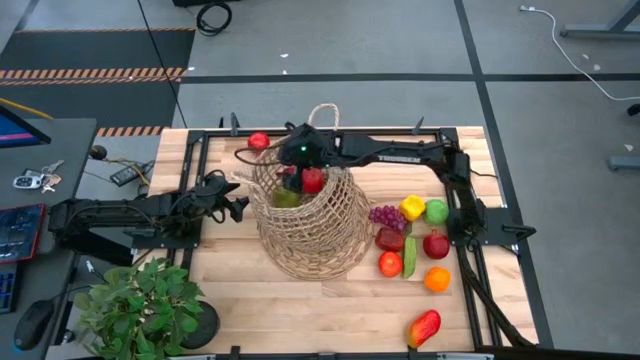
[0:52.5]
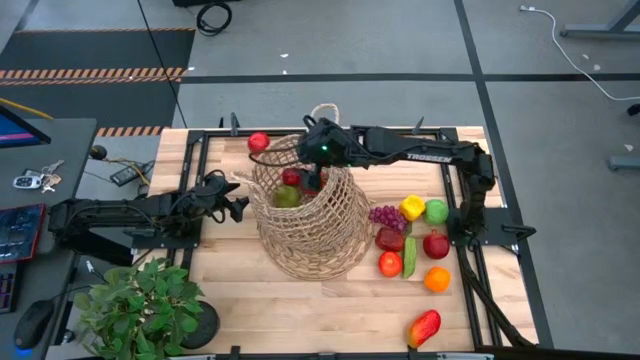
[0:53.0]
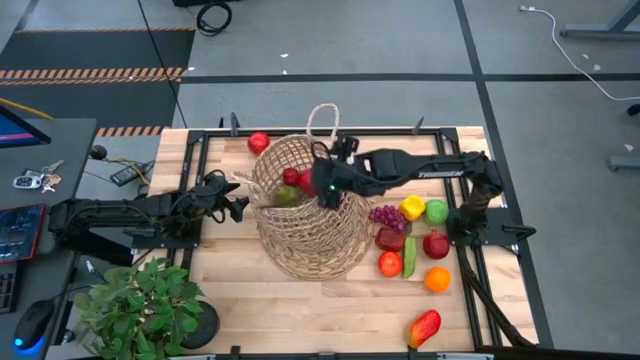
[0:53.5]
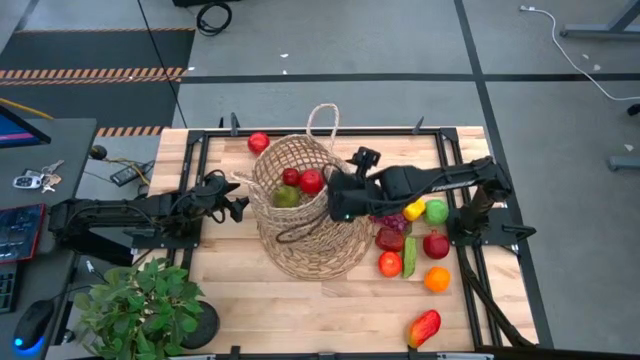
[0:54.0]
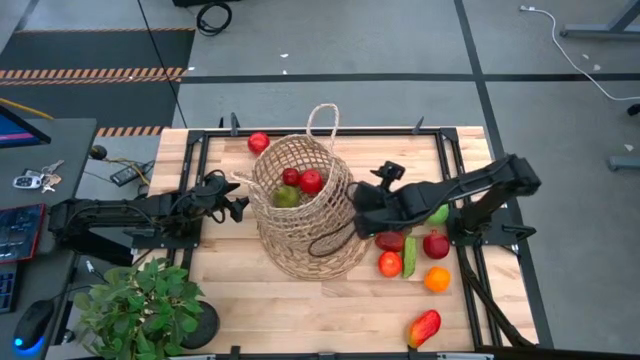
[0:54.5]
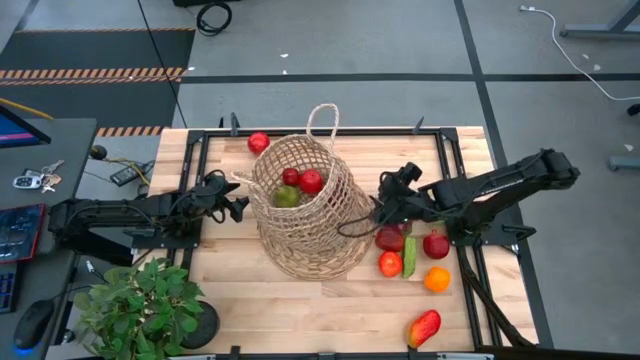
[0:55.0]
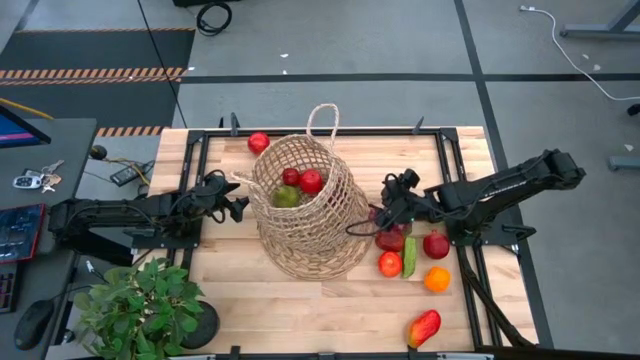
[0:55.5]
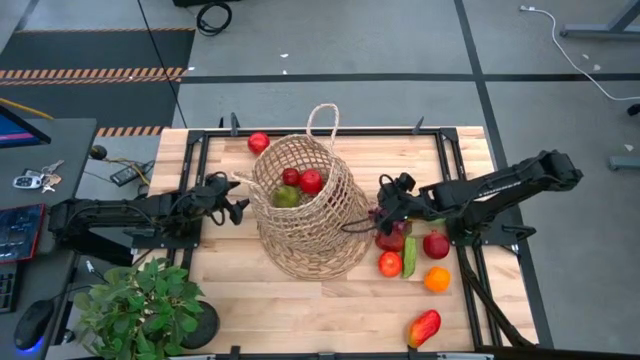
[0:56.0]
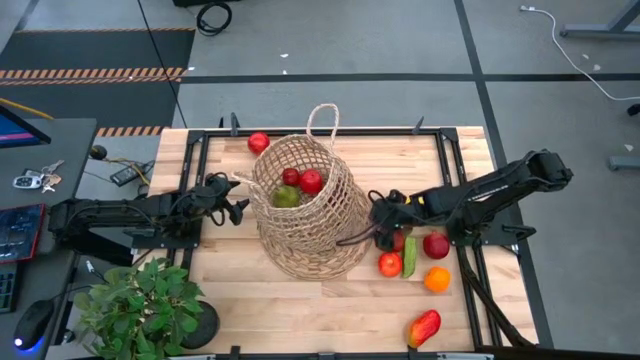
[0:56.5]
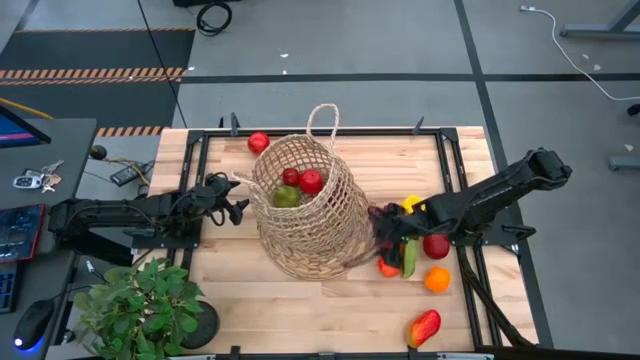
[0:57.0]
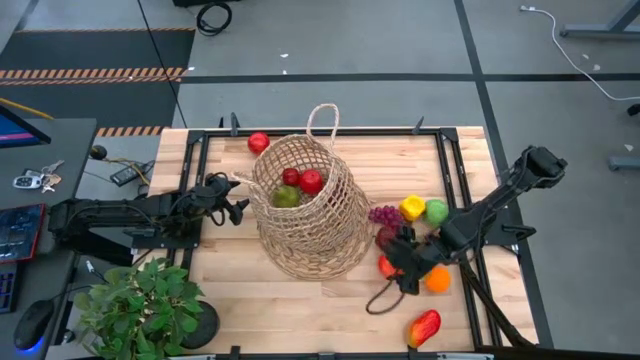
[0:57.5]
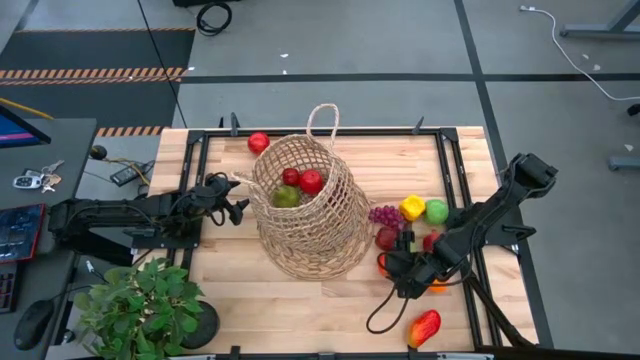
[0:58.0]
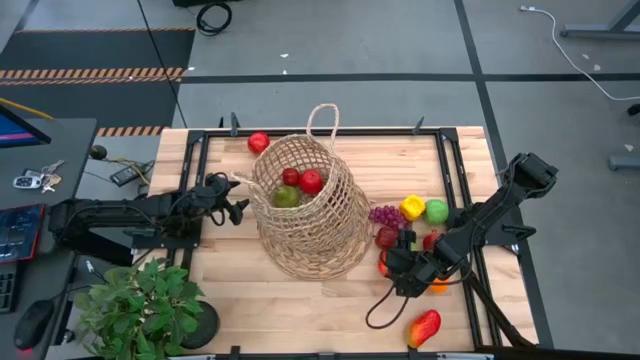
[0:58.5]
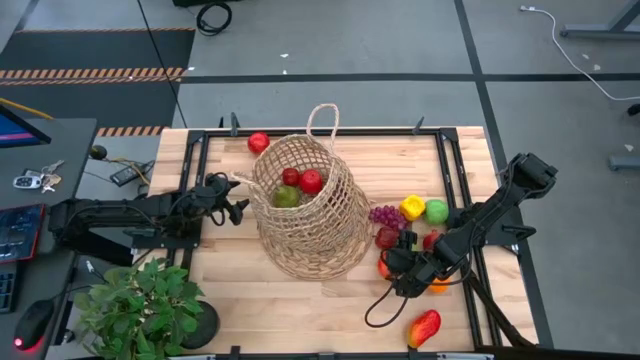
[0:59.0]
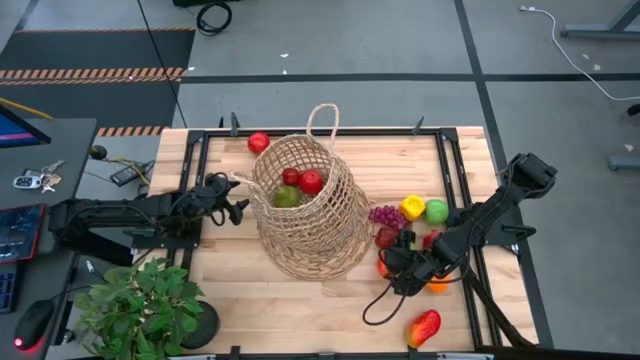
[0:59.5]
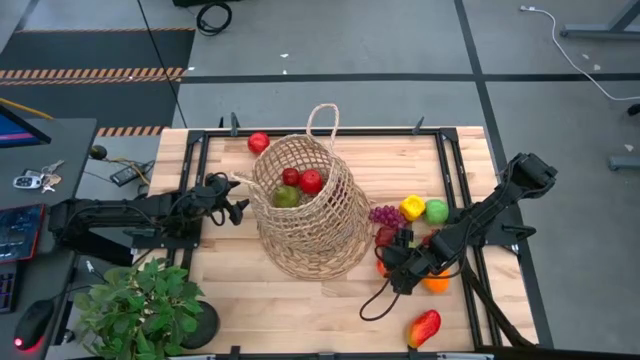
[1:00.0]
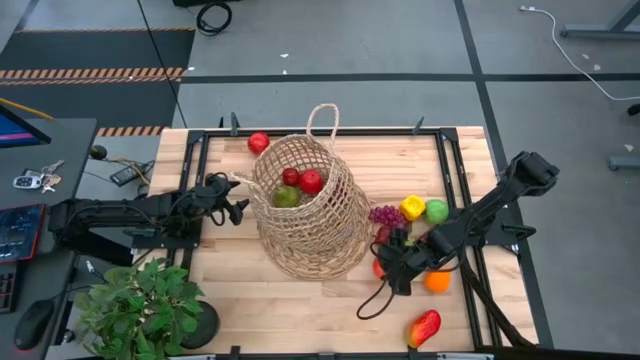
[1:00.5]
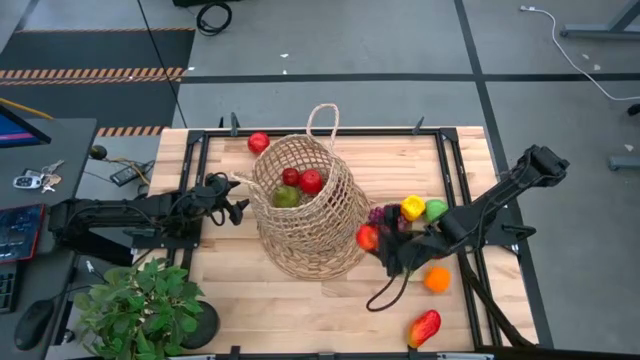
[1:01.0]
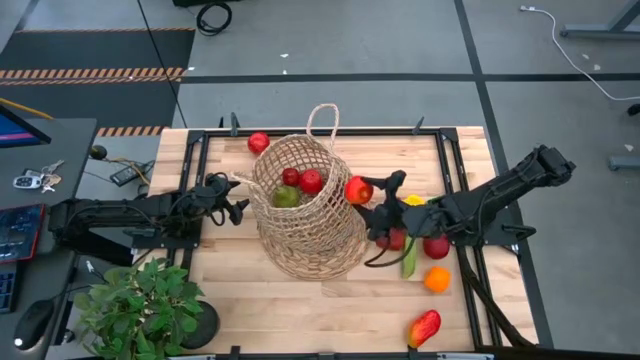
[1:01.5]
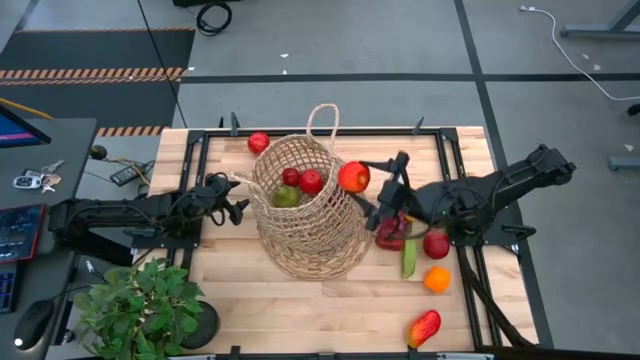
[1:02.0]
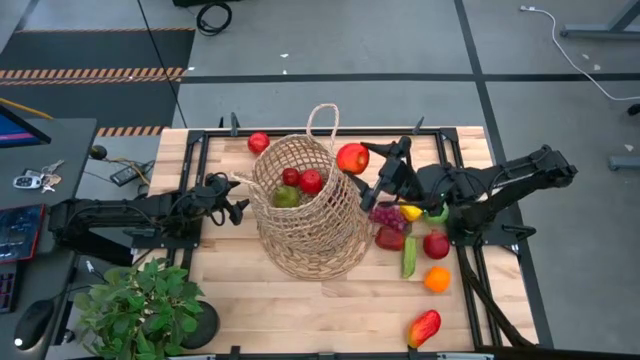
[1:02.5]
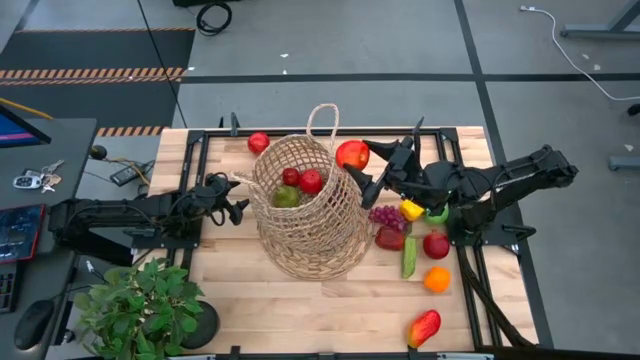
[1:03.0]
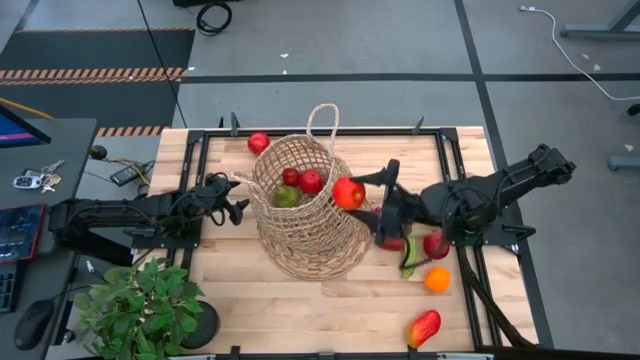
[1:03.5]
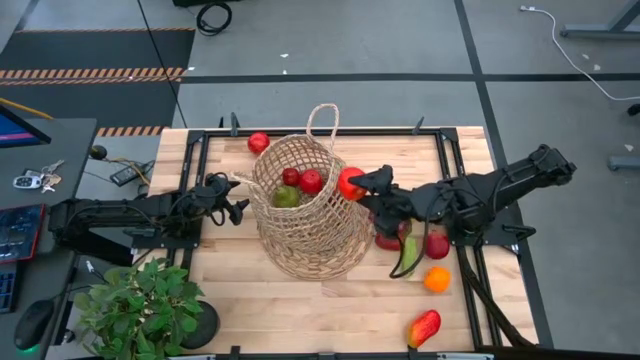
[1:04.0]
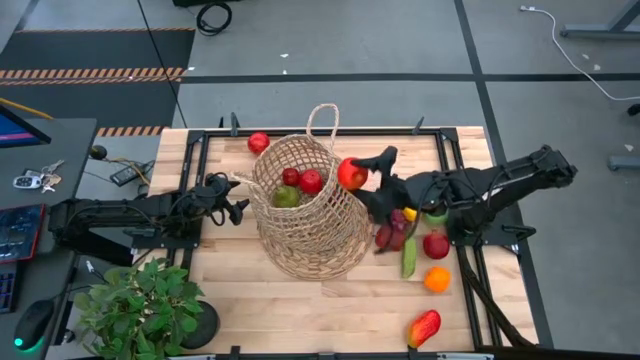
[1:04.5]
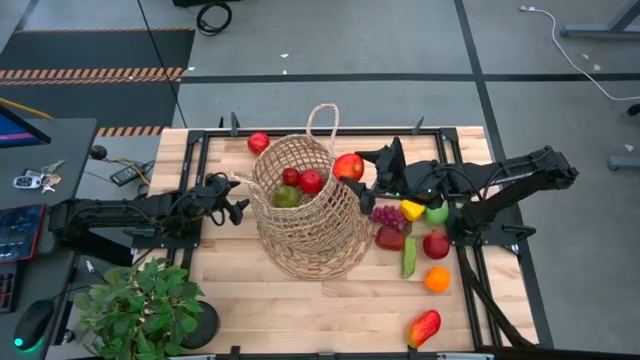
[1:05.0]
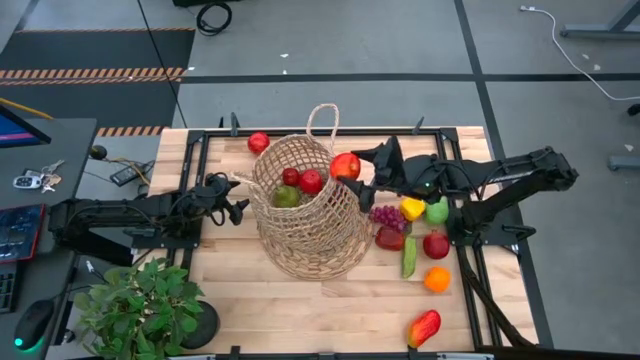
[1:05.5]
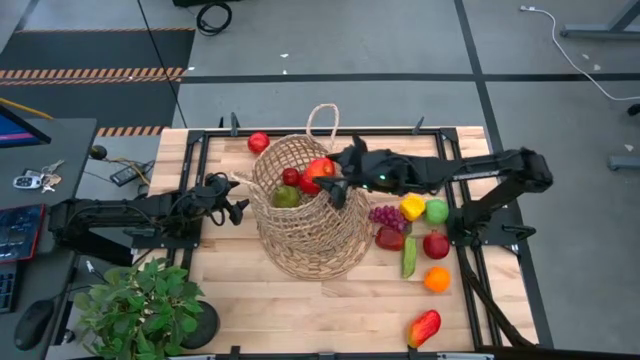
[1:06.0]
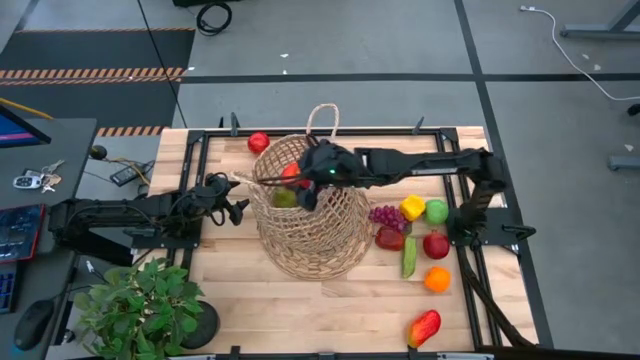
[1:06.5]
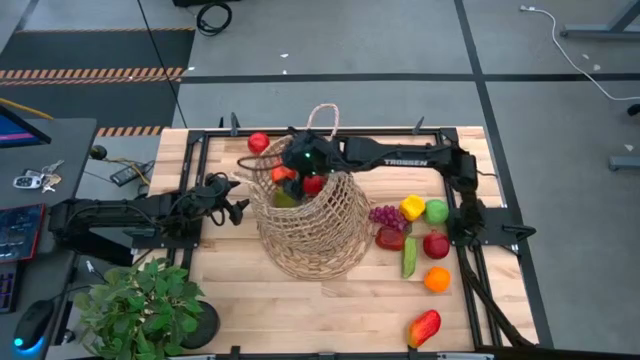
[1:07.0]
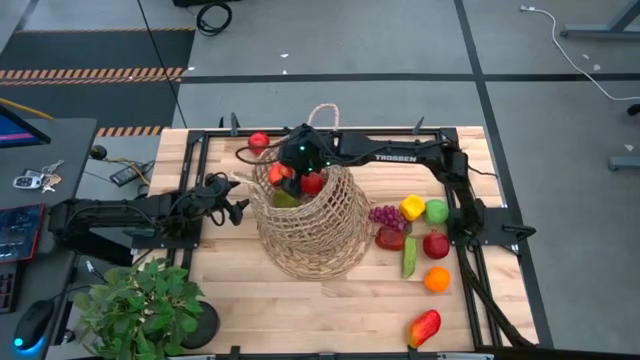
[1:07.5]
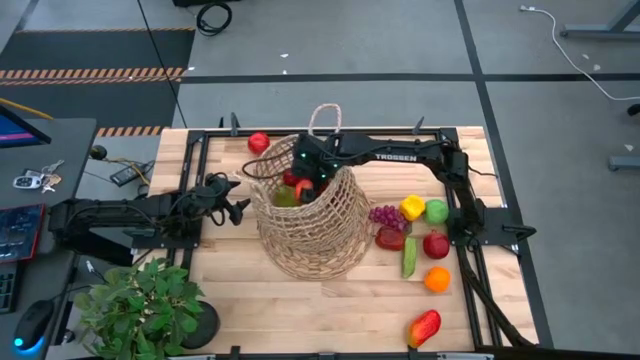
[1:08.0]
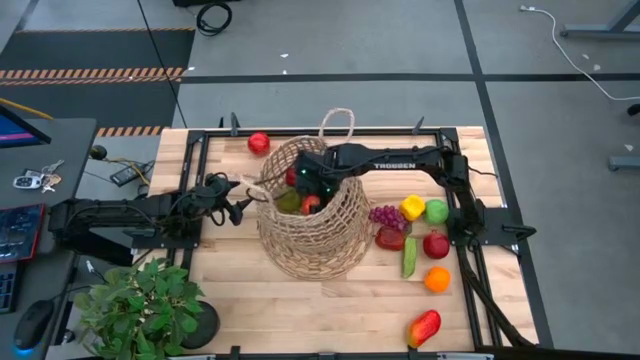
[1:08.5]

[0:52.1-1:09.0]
Task: Build produce basket
Put the bottom red apple into the basket

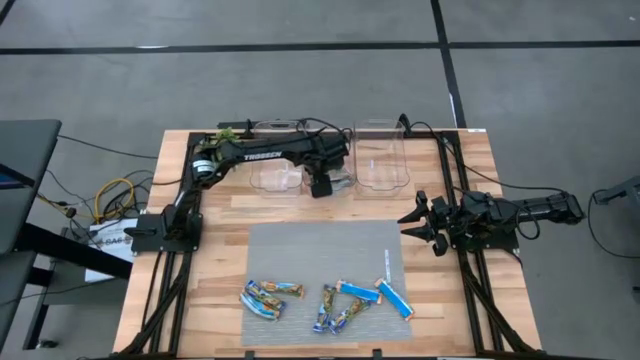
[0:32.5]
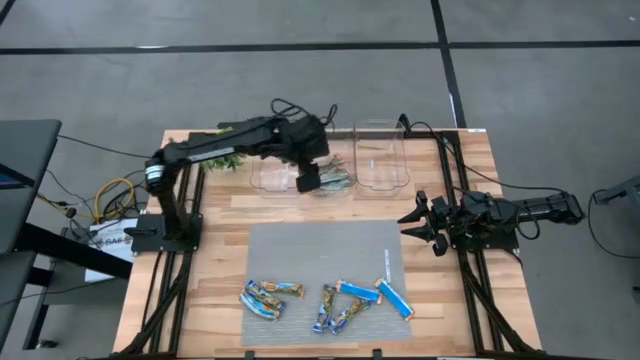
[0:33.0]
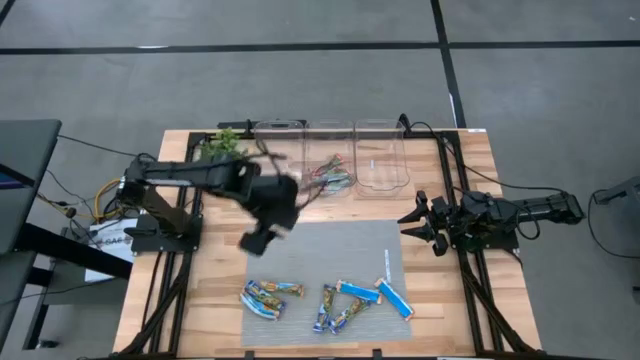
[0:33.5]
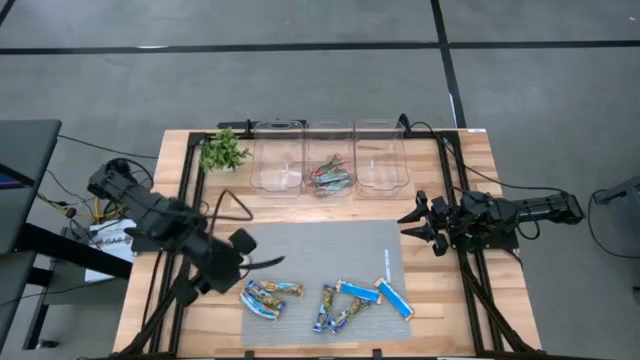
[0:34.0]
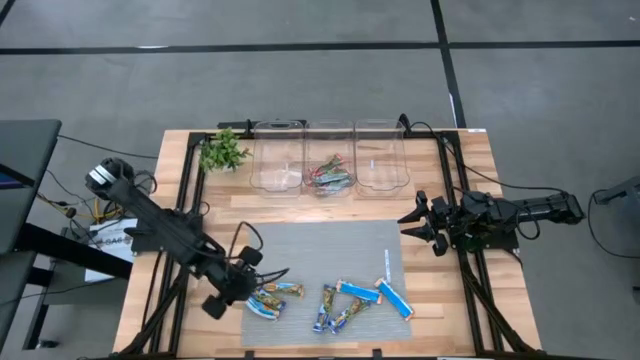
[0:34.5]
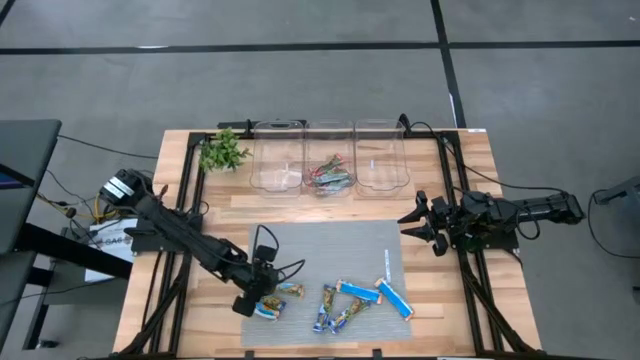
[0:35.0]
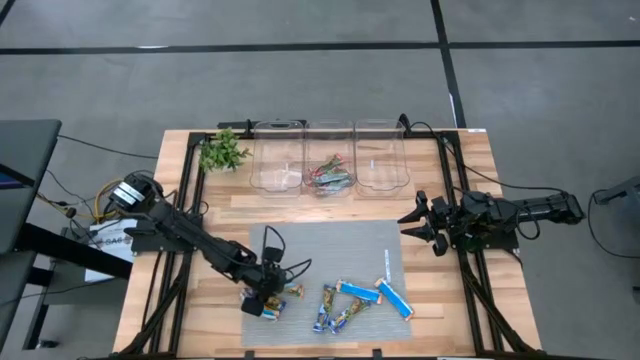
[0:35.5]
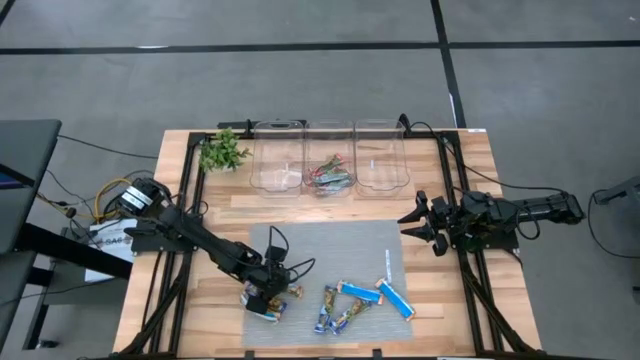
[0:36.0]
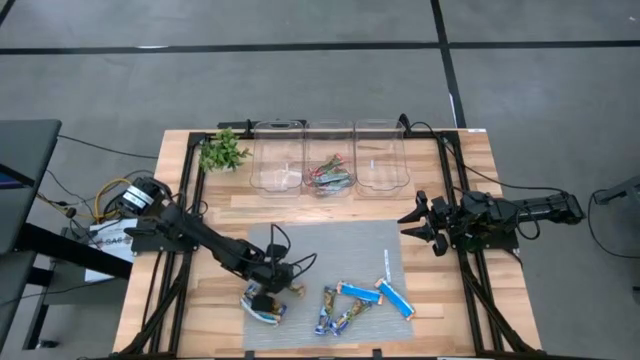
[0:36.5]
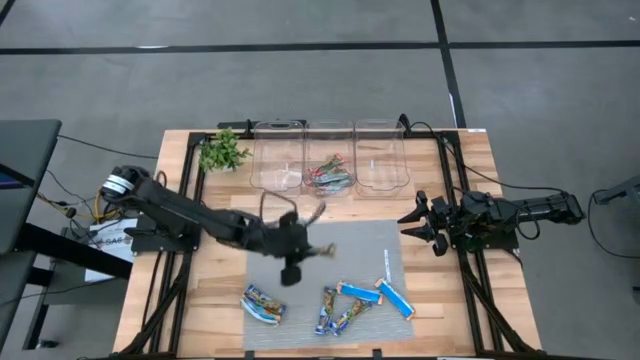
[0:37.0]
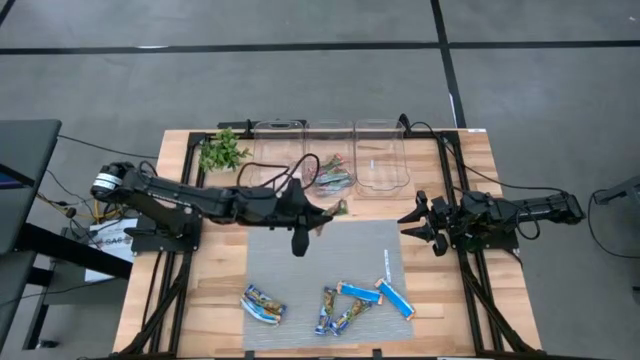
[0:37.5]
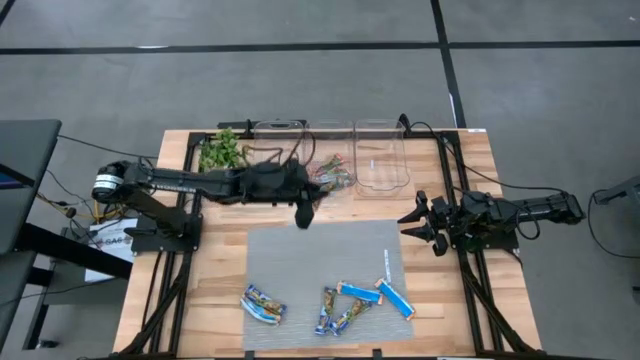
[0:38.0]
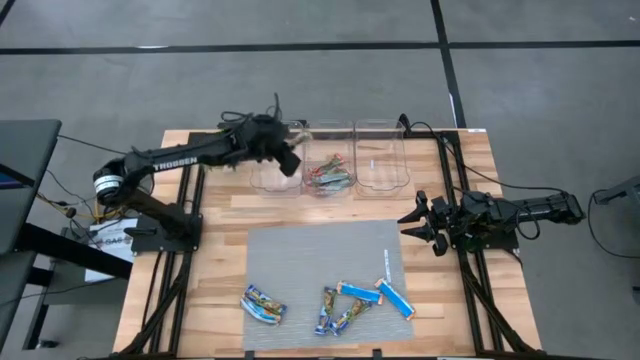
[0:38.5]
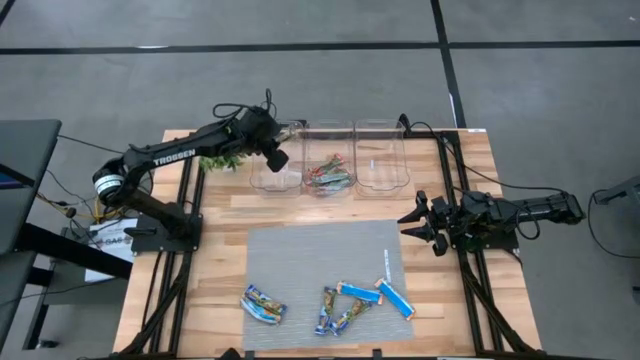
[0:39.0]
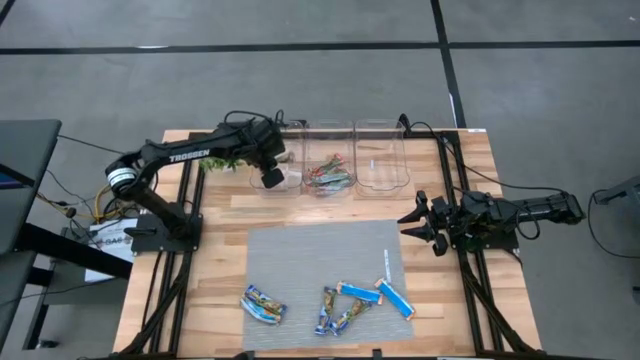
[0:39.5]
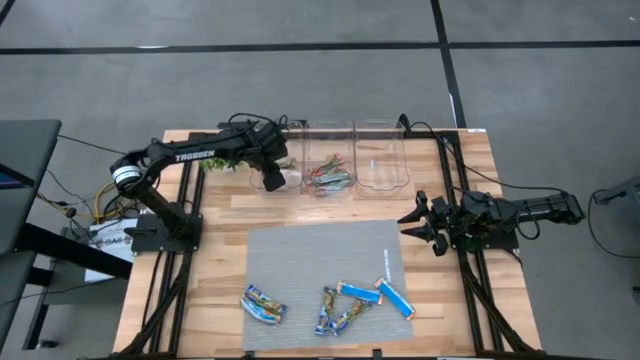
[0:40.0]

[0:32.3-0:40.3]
Task: Pick and place Granola Bars by type
Put the yellow granola bar into the left transparent bin
